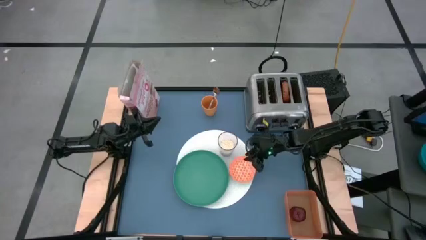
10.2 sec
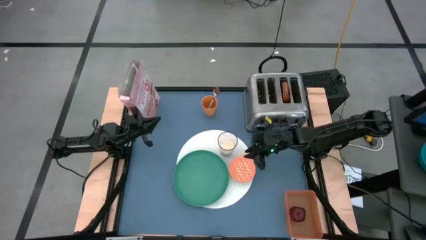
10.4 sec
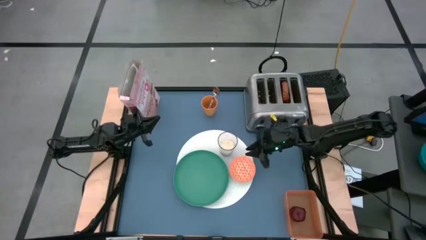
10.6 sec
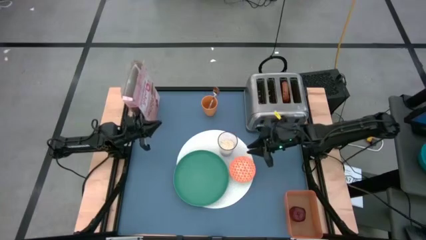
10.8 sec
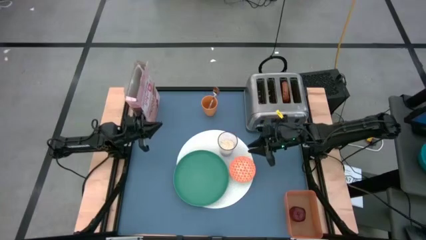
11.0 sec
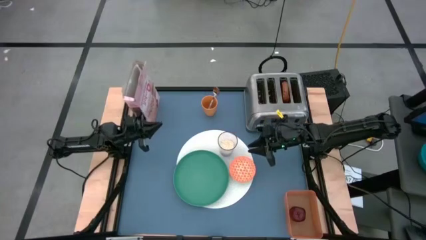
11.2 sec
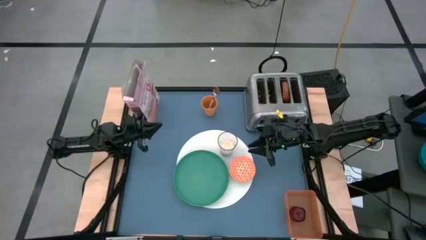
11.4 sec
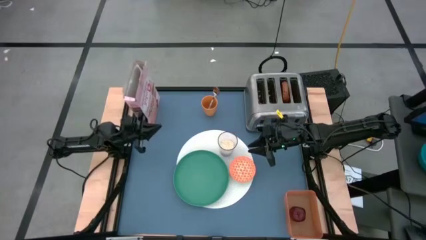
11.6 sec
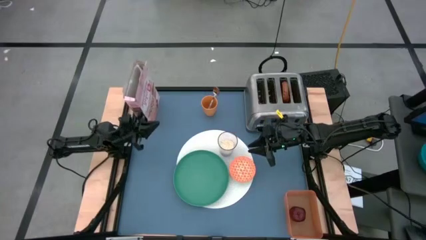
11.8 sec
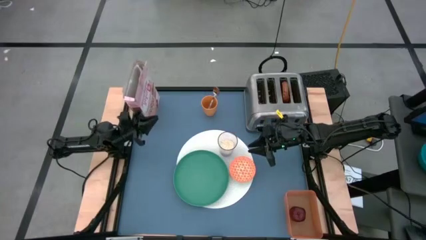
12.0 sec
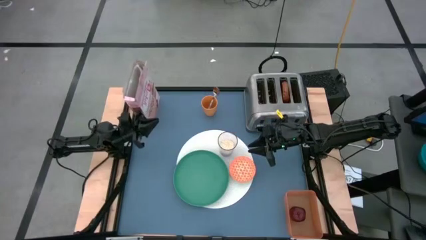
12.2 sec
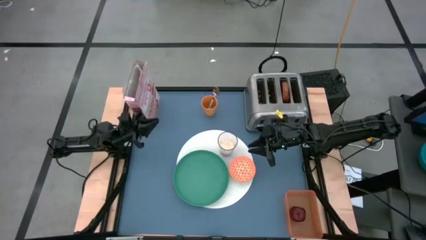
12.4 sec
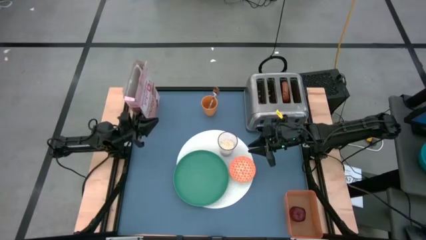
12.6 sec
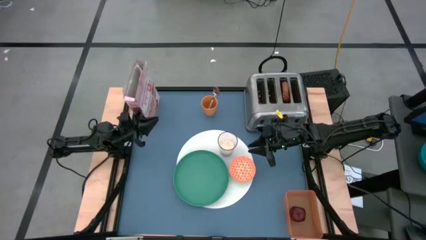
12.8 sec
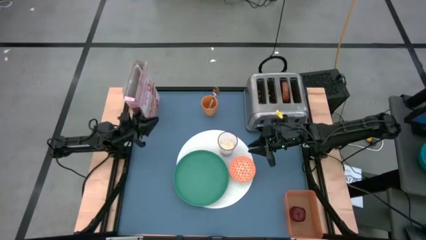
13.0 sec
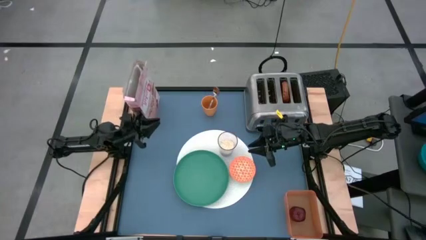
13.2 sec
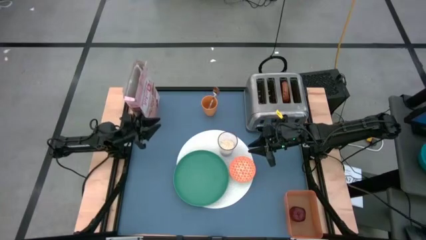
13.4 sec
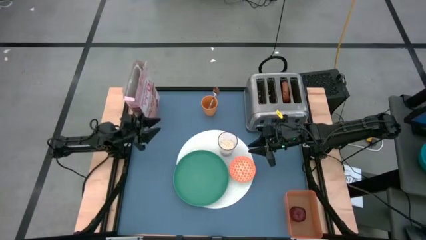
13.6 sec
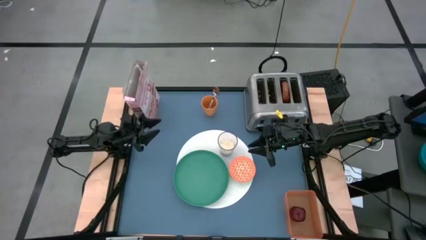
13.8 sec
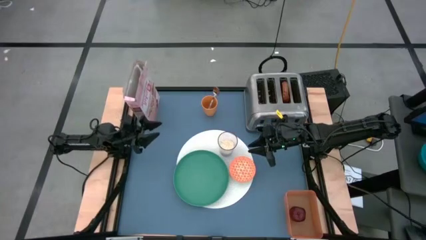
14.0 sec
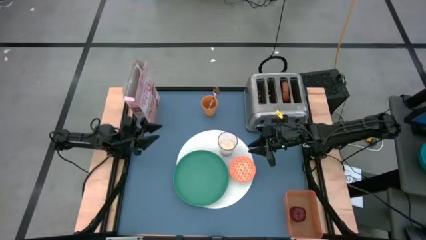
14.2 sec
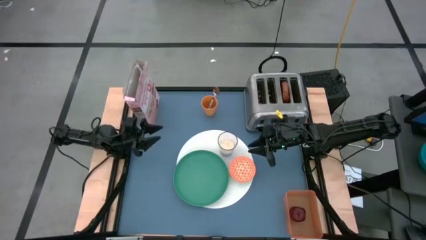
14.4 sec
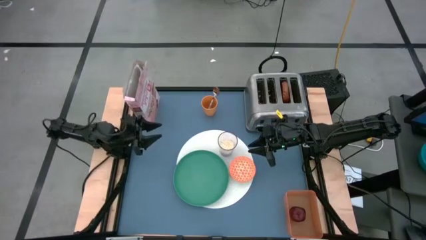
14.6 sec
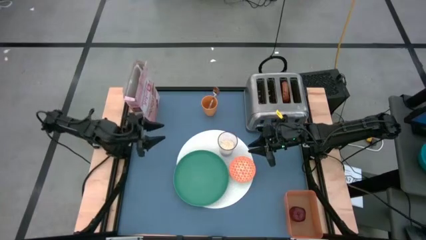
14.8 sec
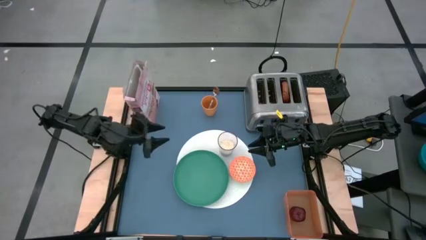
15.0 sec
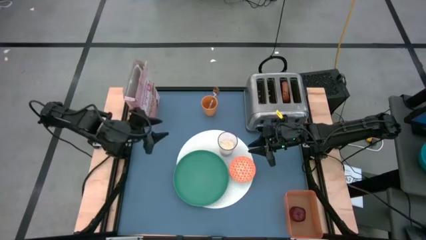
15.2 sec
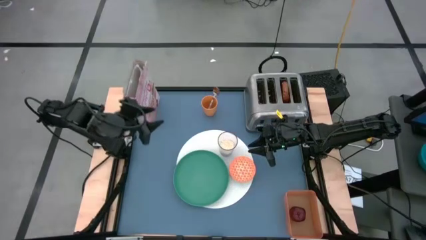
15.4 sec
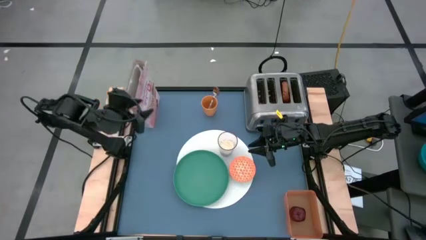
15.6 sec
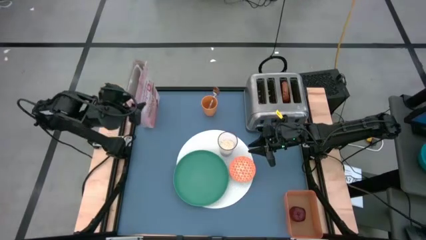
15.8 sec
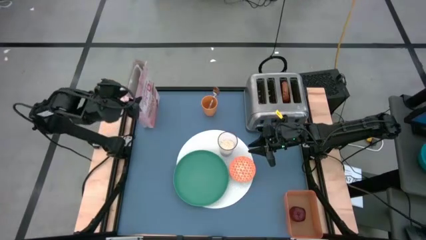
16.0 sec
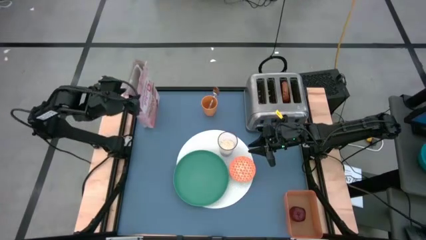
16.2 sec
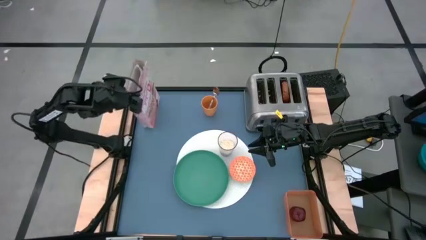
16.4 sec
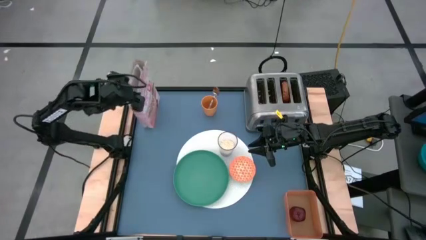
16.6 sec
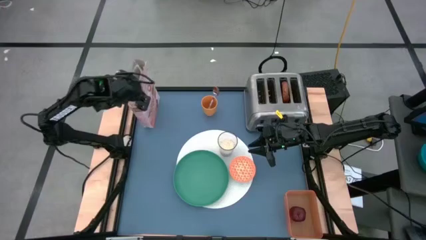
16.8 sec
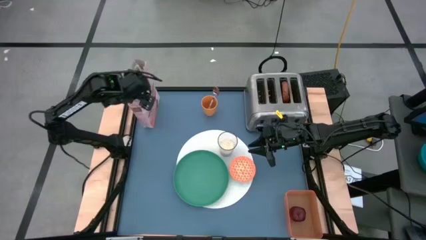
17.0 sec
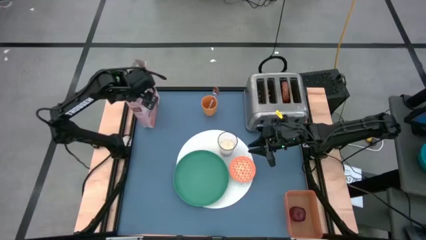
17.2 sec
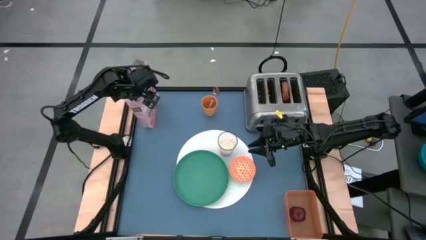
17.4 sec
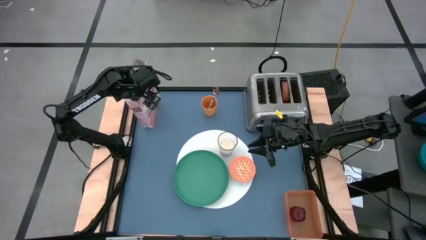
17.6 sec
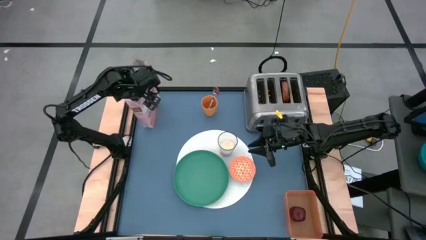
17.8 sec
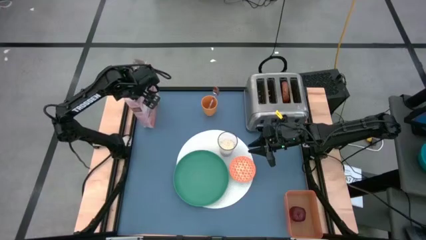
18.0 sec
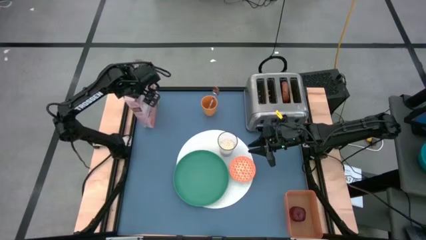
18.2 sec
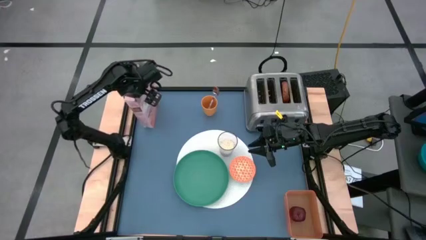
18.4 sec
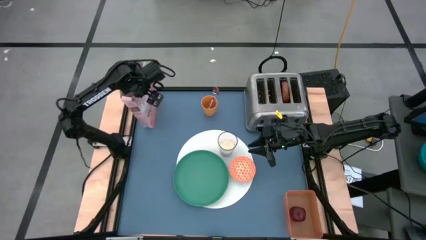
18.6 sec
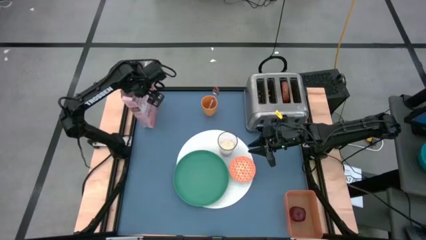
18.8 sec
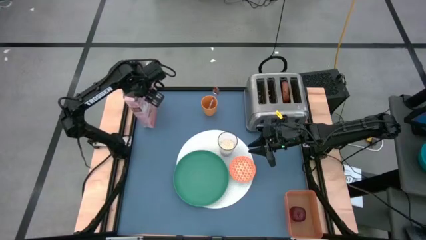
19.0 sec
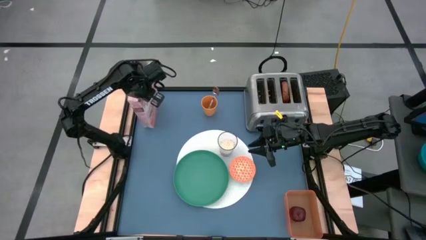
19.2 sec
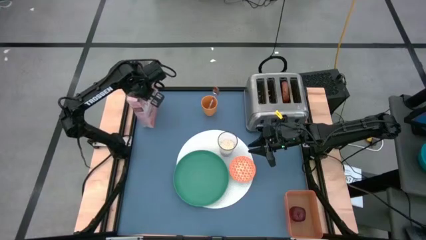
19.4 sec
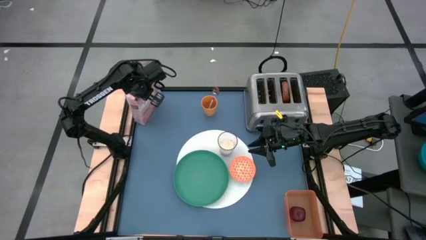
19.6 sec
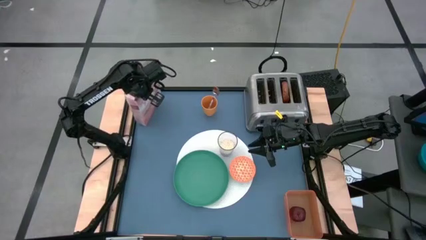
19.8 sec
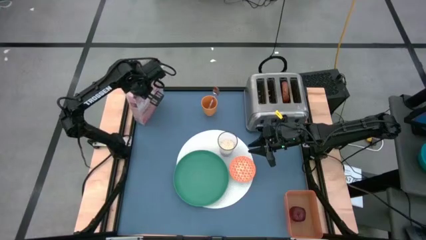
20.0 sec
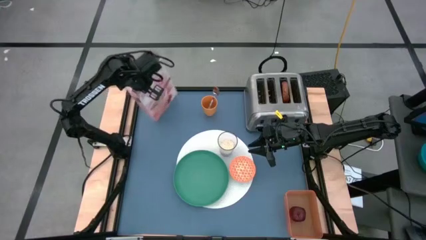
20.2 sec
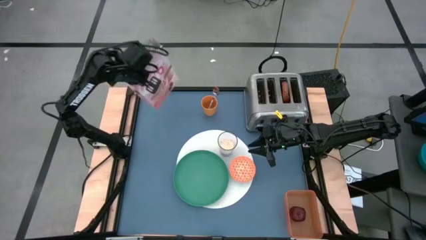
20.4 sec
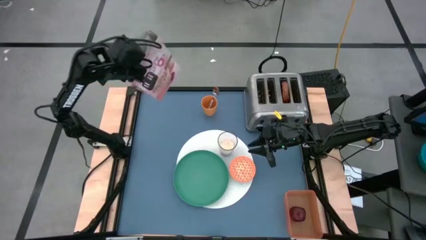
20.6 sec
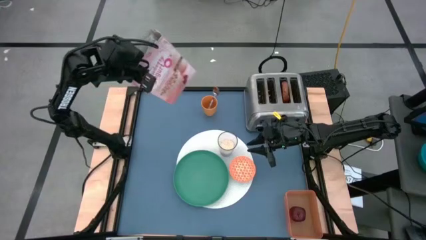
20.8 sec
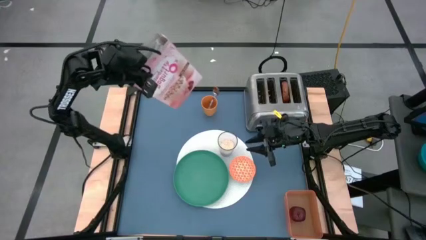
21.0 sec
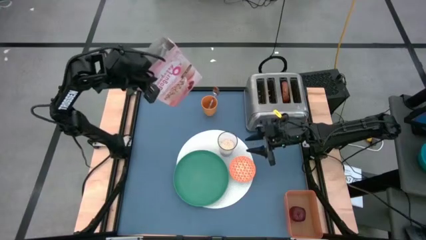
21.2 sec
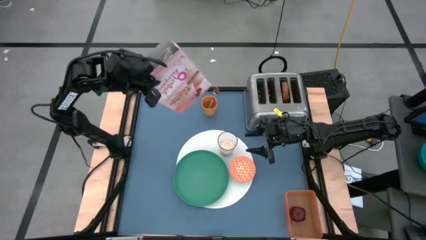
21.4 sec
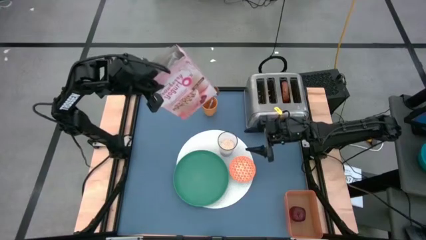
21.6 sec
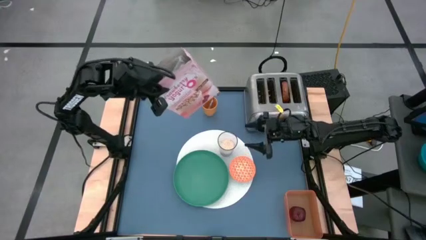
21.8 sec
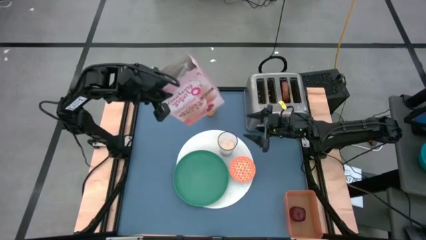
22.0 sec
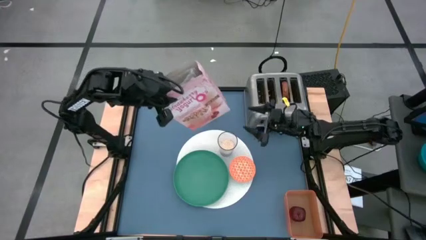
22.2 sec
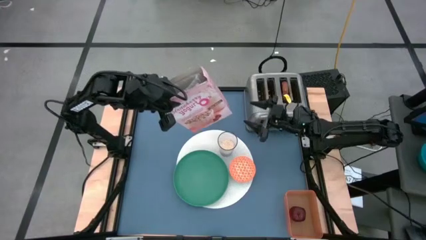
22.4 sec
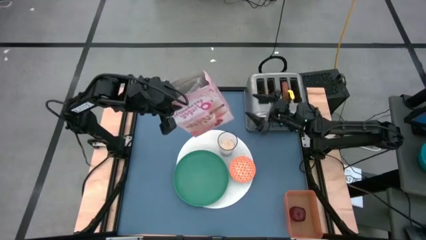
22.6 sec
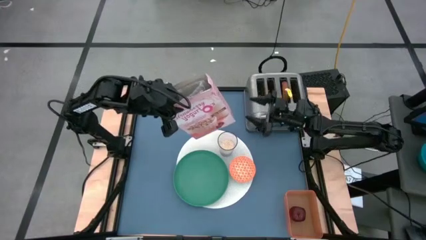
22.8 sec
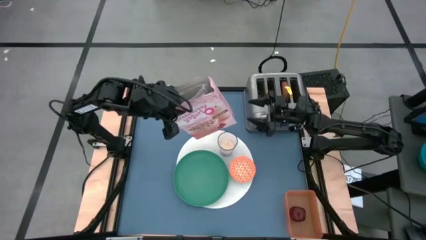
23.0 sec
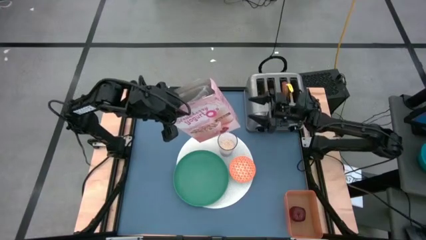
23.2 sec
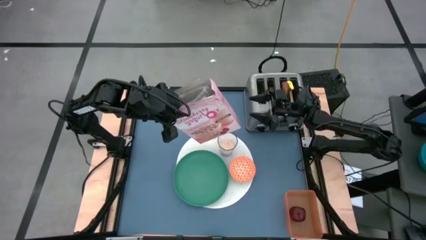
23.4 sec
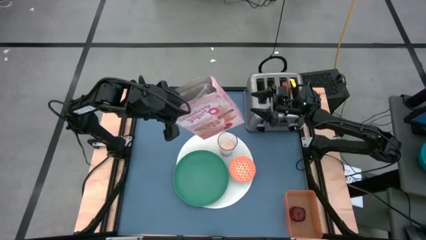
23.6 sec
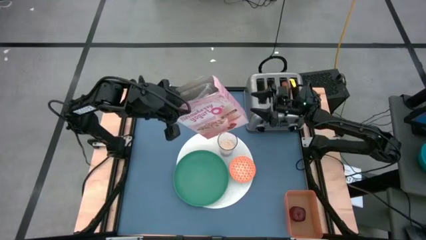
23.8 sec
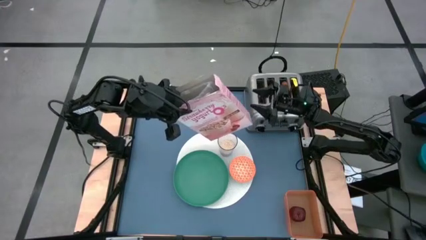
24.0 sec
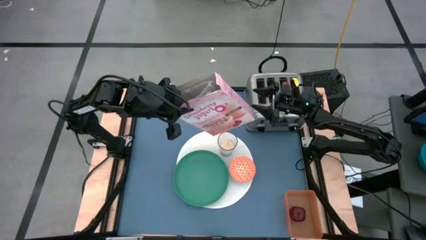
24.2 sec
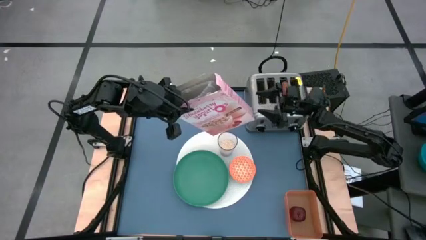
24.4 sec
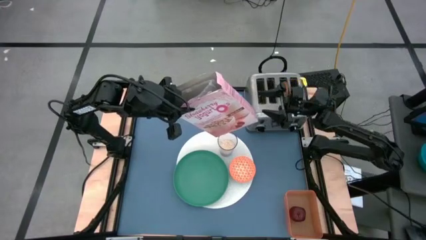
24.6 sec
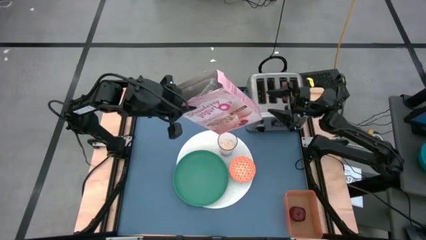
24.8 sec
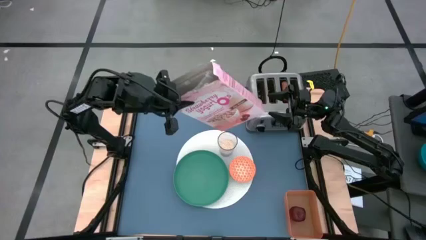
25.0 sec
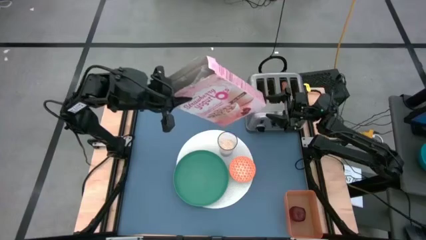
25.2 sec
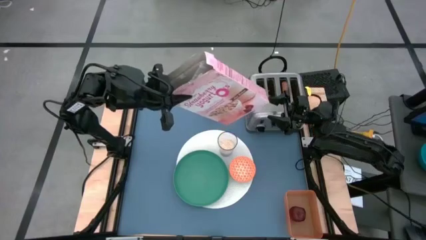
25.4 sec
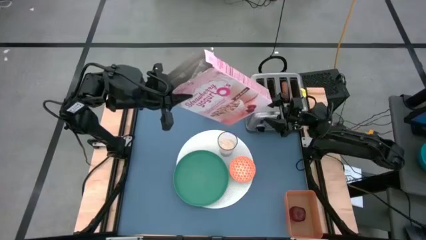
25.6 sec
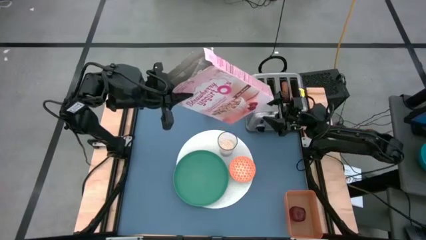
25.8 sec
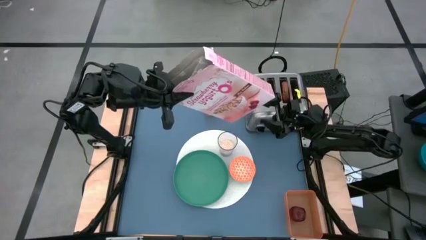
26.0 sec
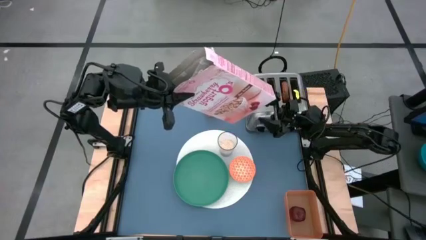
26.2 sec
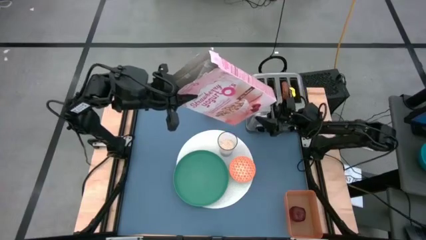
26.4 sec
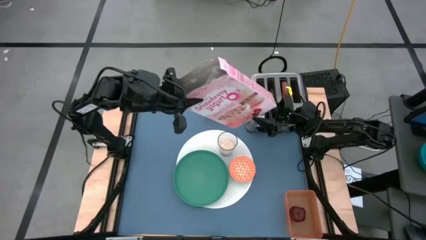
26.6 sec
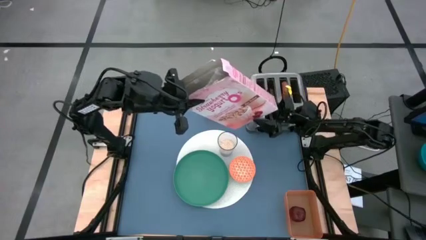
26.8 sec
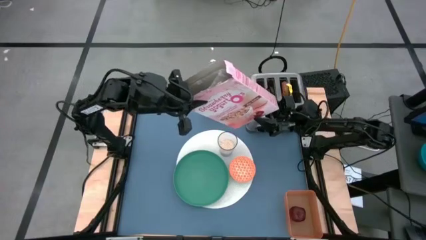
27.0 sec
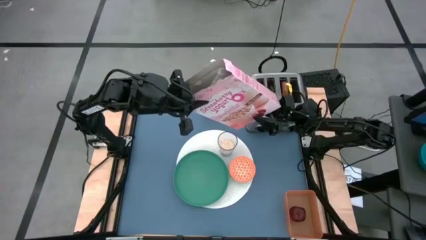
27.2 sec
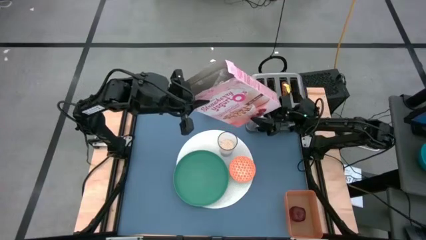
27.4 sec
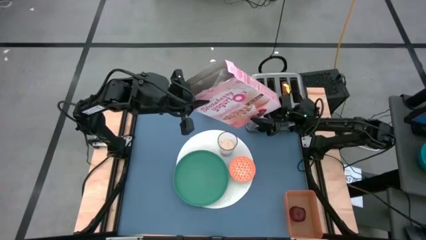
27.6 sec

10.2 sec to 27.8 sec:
Task: Arrange a breakfast setting
Pour the cereal into the orange bowl
